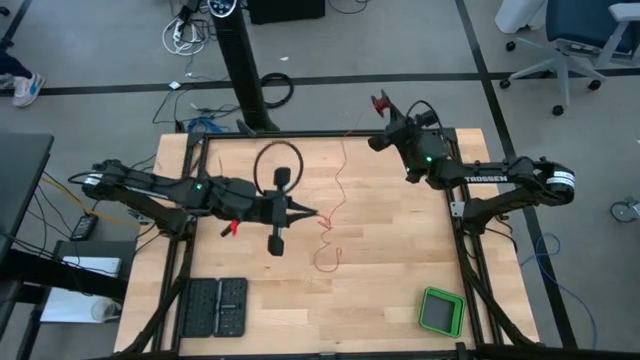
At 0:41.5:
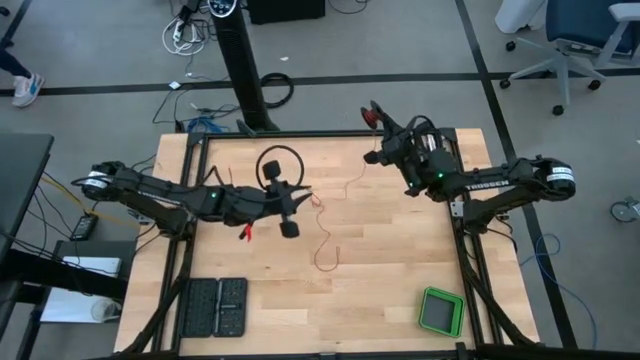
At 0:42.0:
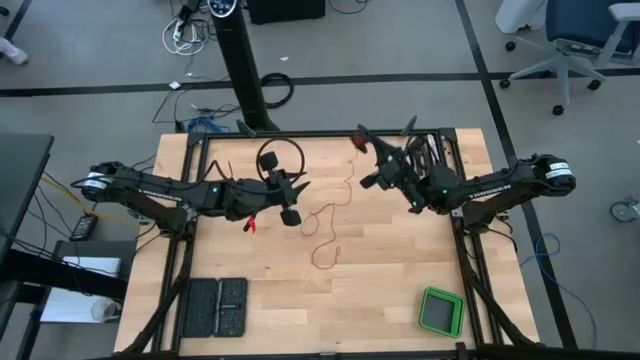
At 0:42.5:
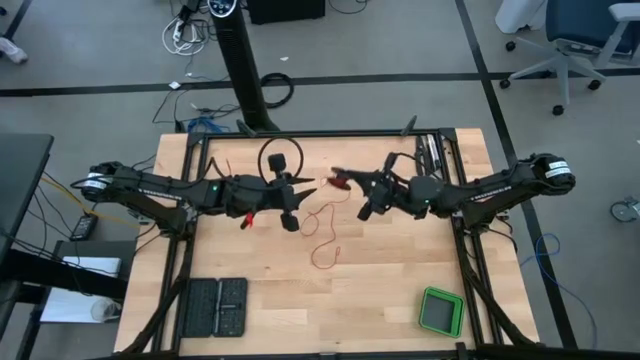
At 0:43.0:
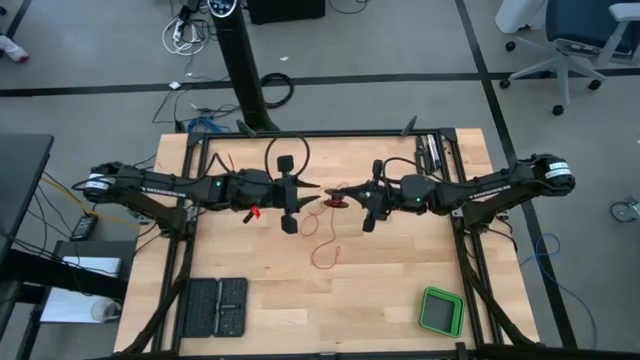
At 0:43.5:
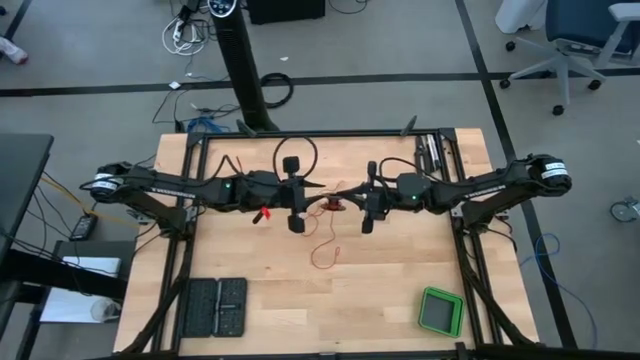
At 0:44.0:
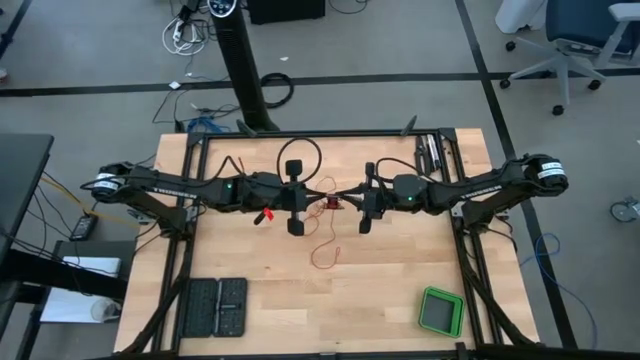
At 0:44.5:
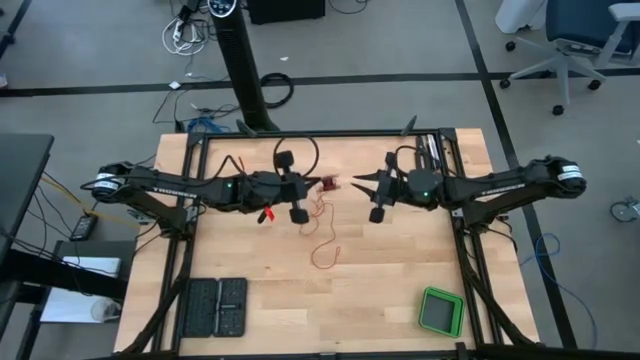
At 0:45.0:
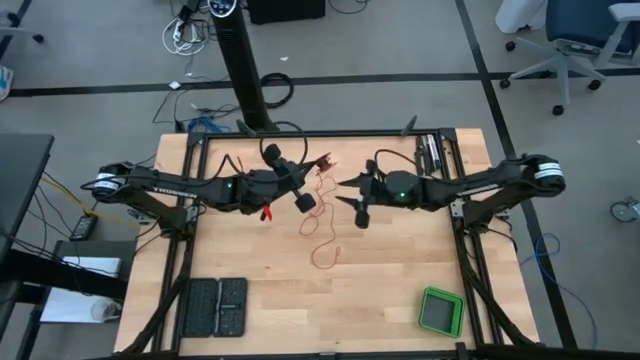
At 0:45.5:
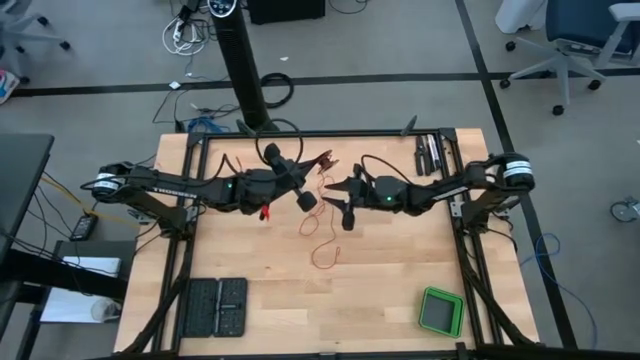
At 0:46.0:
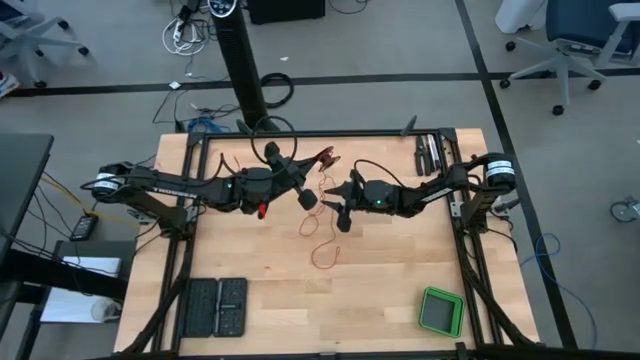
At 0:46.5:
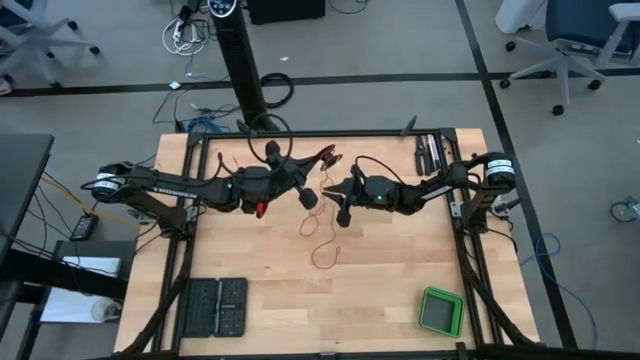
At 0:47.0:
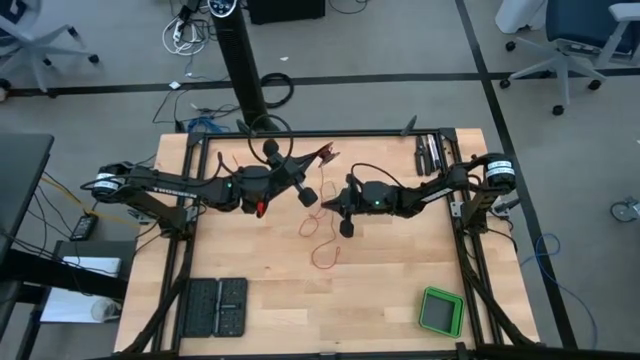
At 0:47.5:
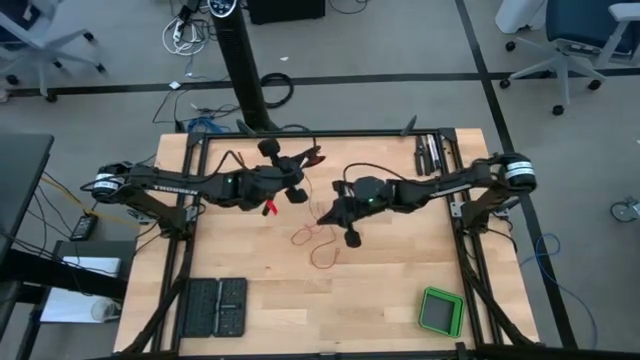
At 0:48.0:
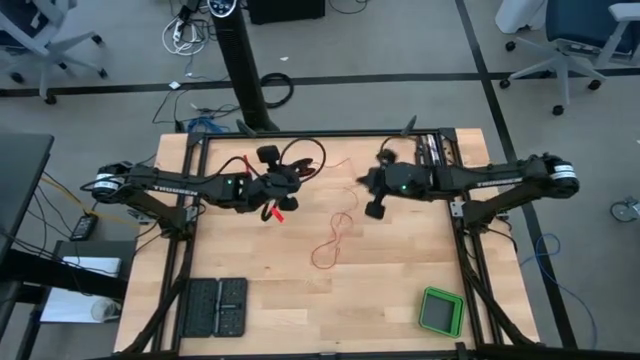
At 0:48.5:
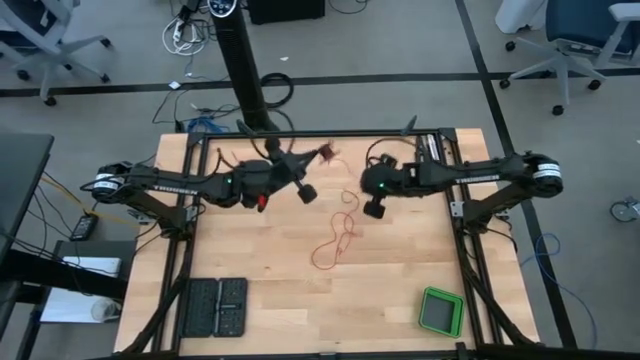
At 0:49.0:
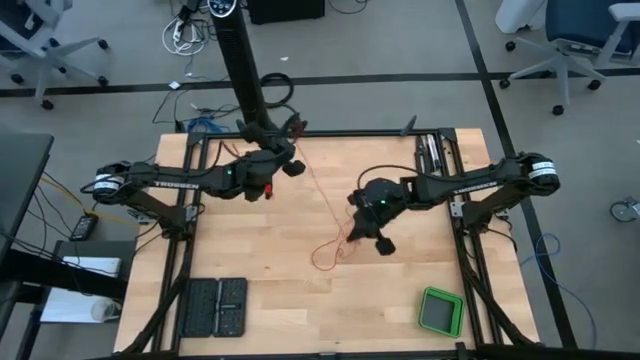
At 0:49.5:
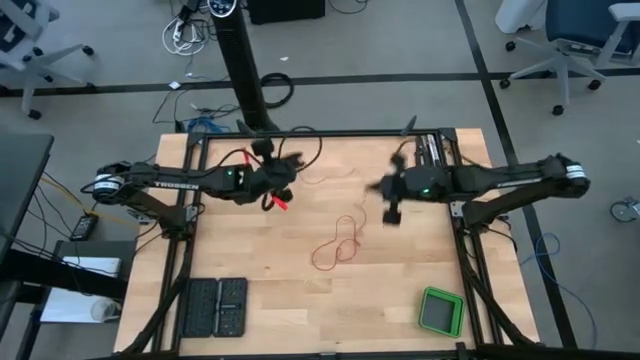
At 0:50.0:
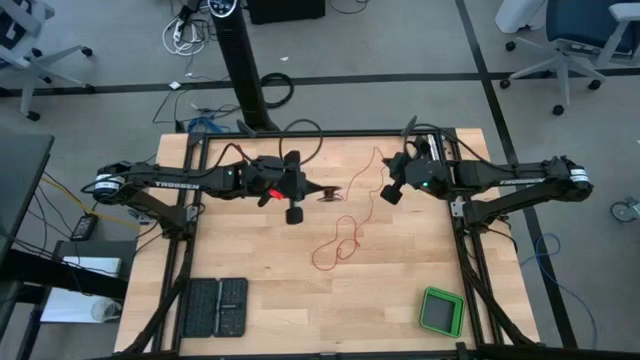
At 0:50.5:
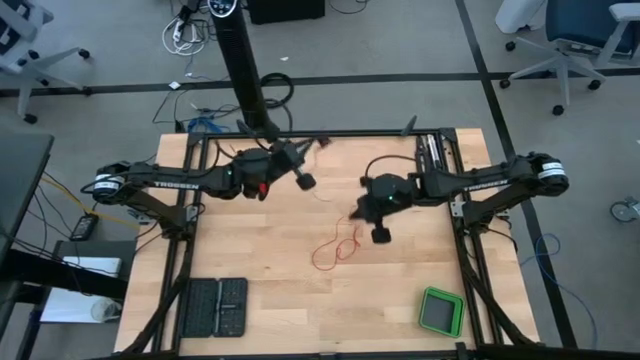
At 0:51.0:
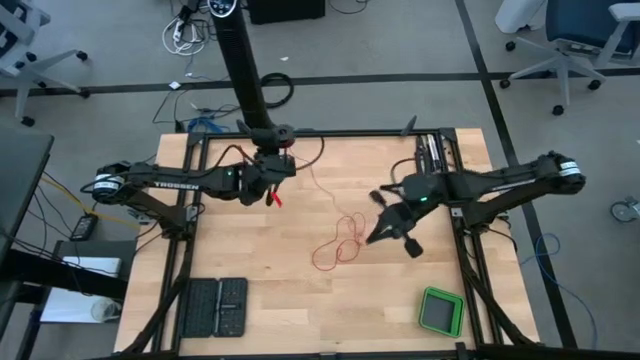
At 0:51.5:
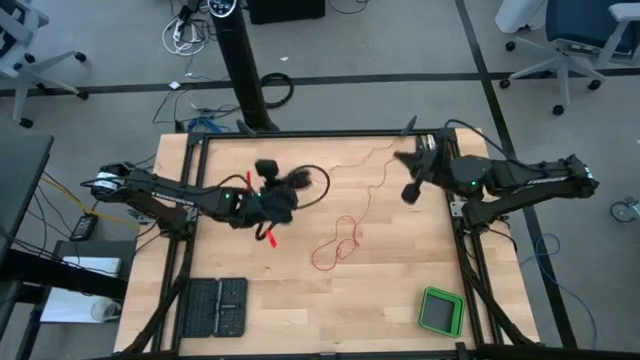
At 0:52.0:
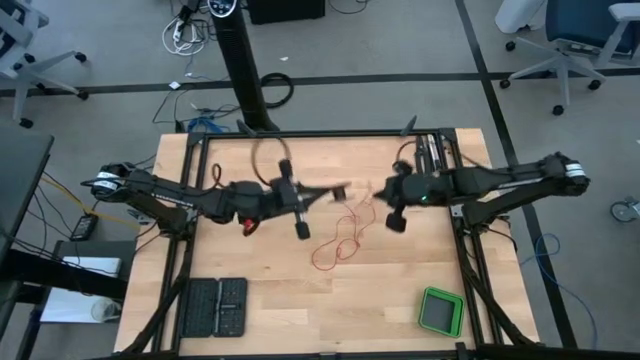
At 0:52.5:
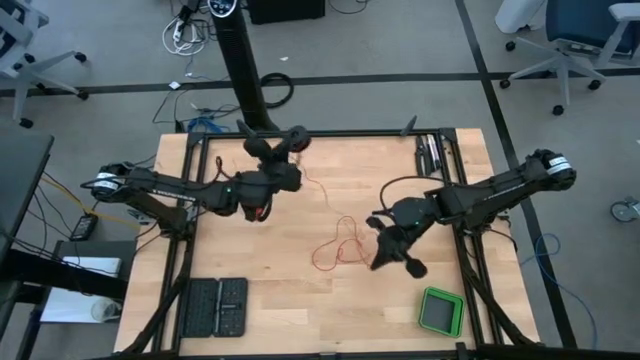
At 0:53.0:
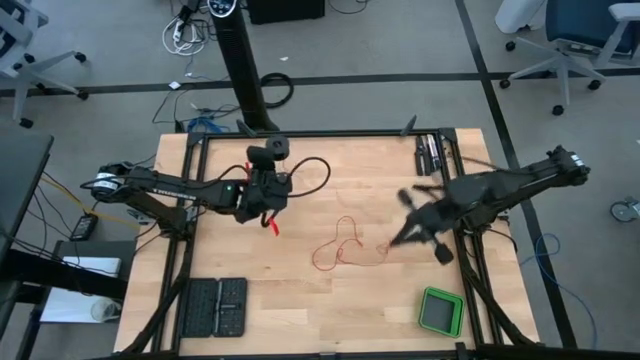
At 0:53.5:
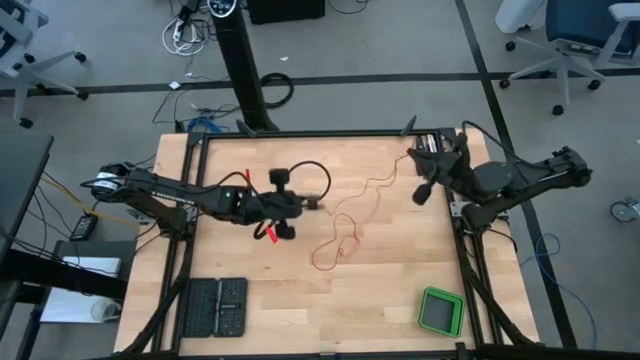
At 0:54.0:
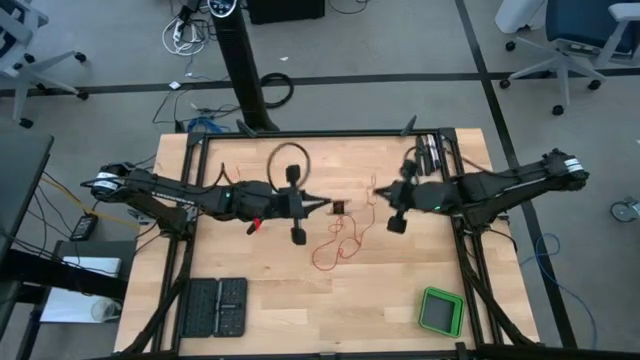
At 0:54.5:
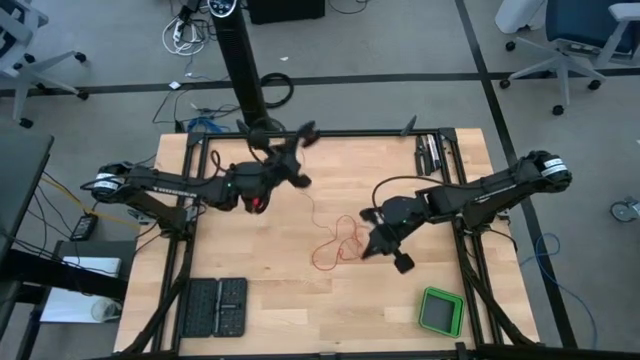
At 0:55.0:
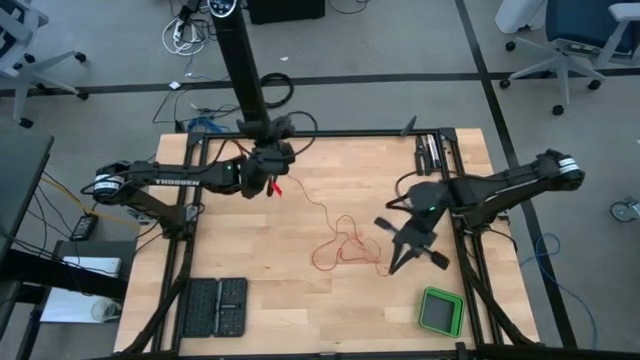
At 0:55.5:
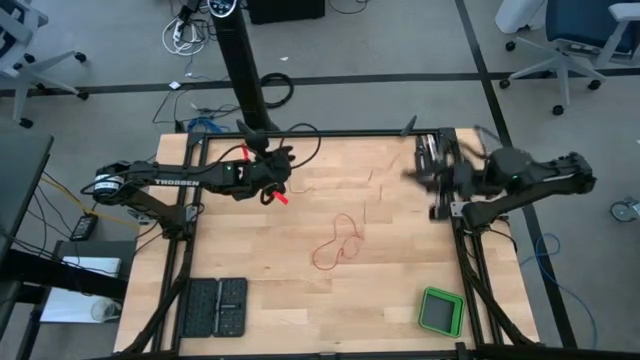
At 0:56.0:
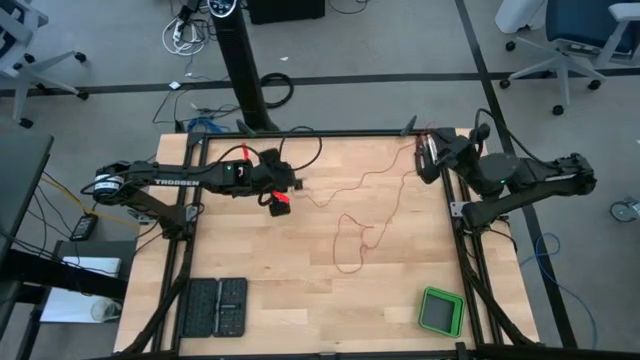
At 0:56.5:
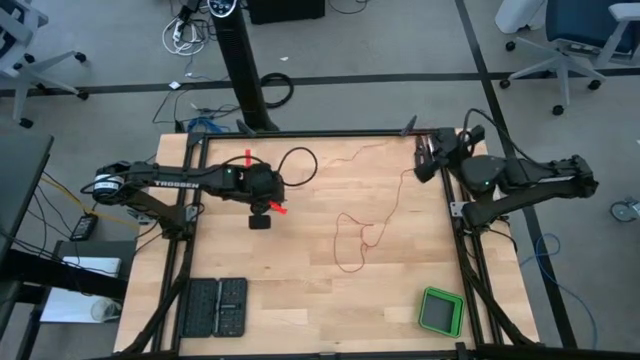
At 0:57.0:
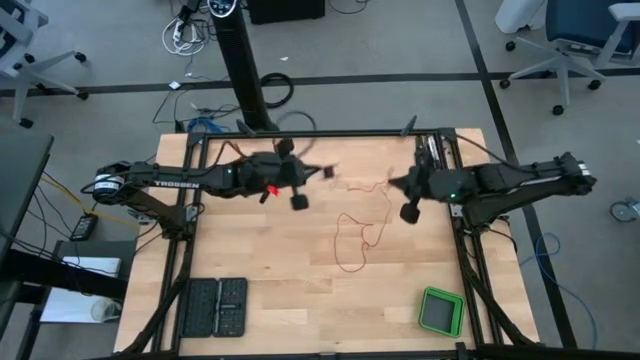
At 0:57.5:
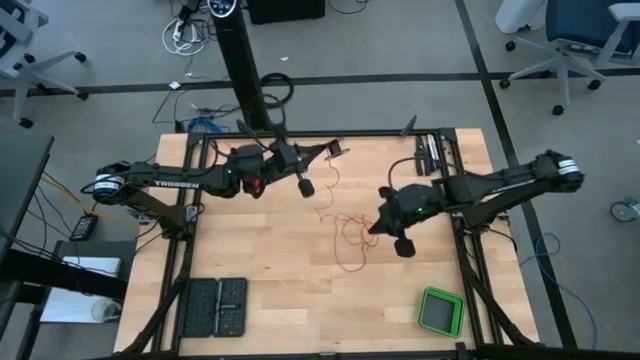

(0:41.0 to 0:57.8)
Task: Coil cords
Uncoil the red wire cable from the black spool

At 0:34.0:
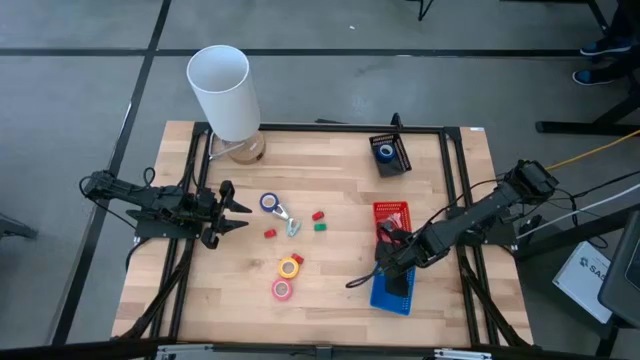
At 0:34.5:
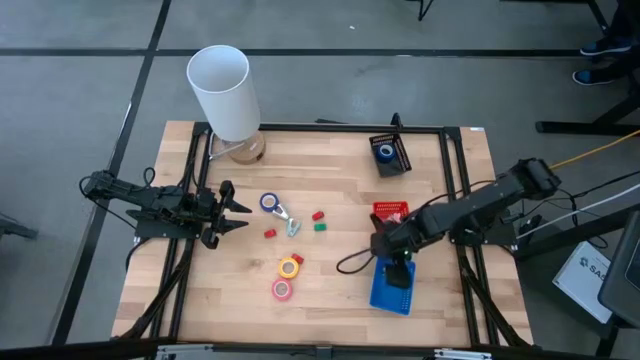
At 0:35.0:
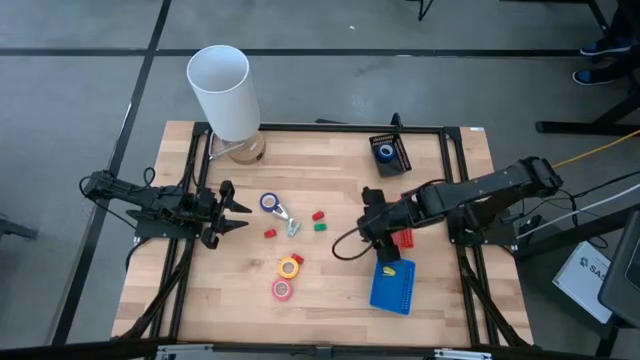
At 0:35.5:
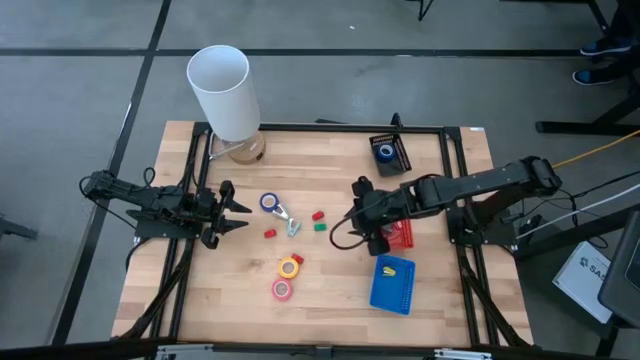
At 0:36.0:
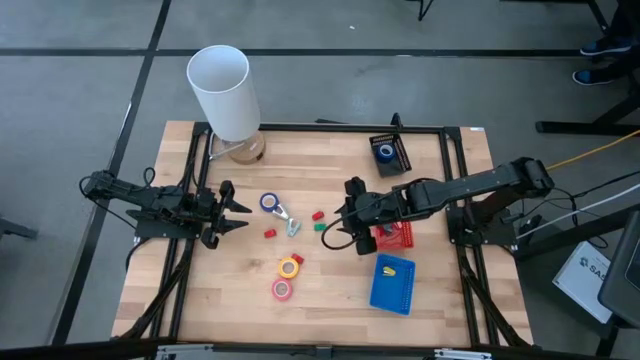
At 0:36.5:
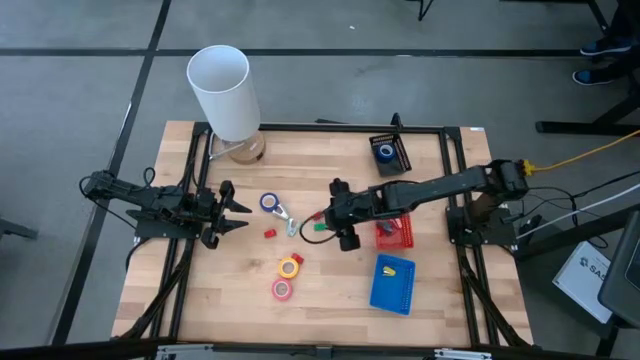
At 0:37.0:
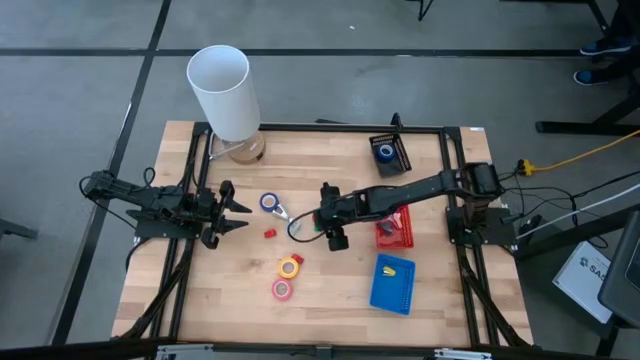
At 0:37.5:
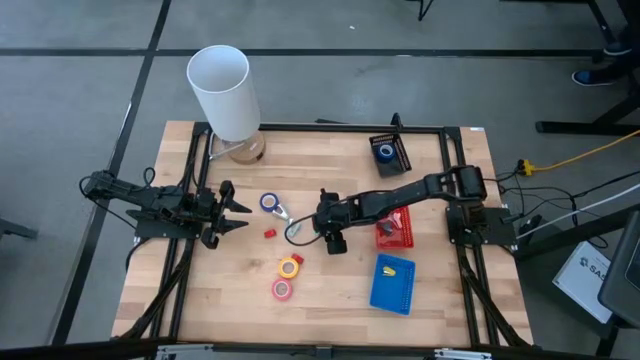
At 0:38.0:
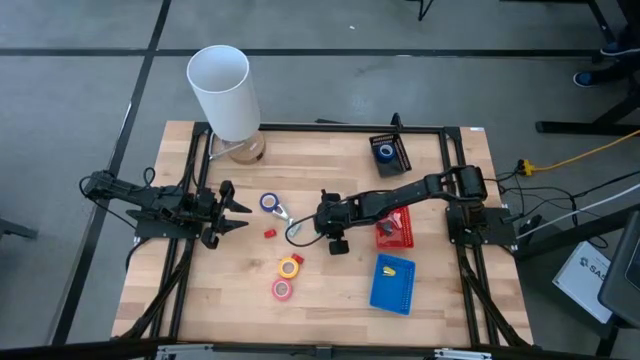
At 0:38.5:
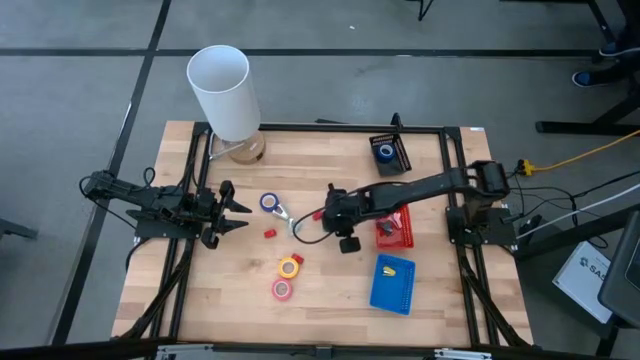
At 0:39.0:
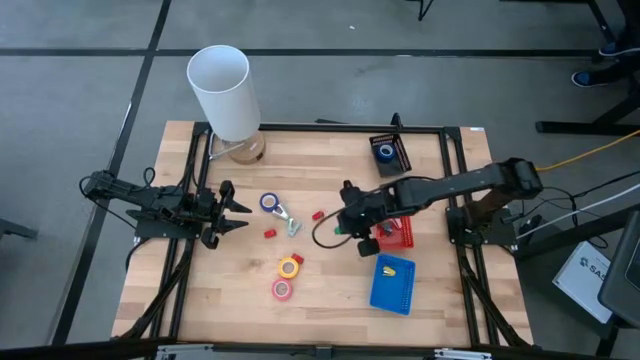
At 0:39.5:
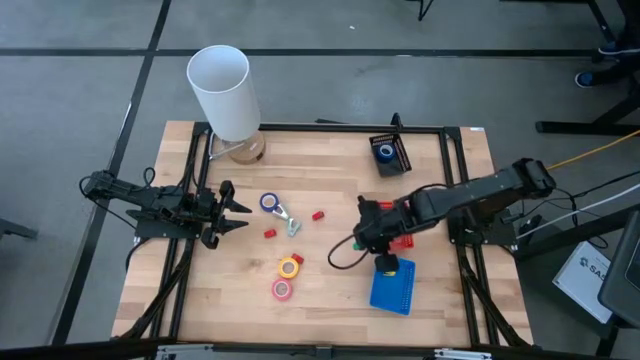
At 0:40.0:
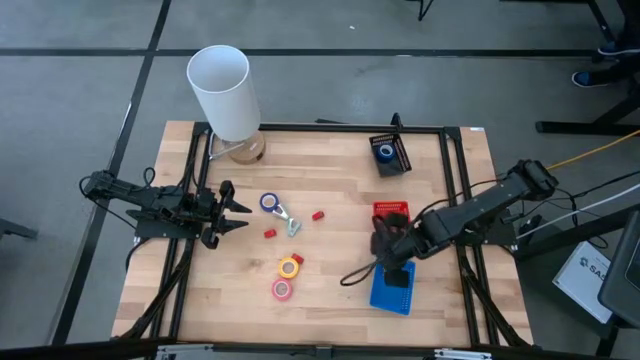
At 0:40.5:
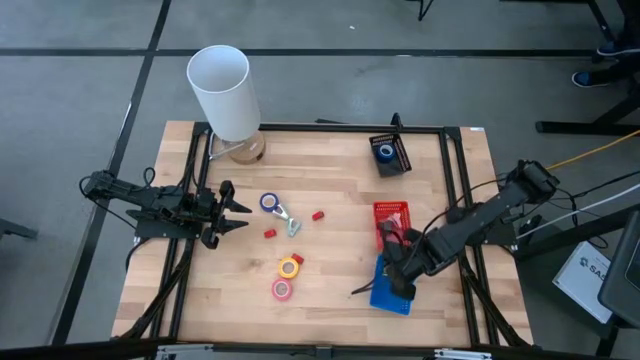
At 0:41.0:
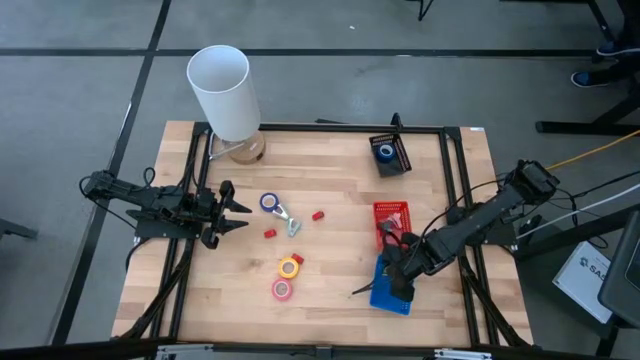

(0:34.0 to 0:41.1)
Task: Pick and place Stapler, Stapler remover, tape
Put the green stapler into the blue basket
